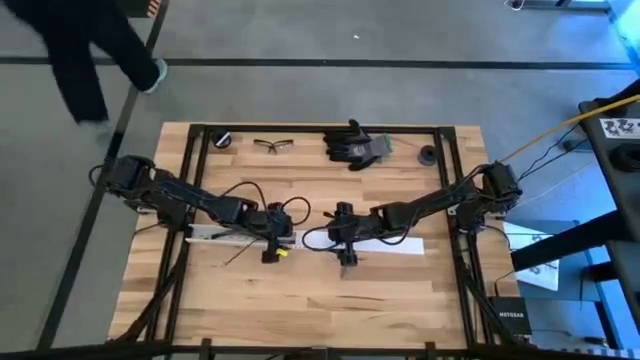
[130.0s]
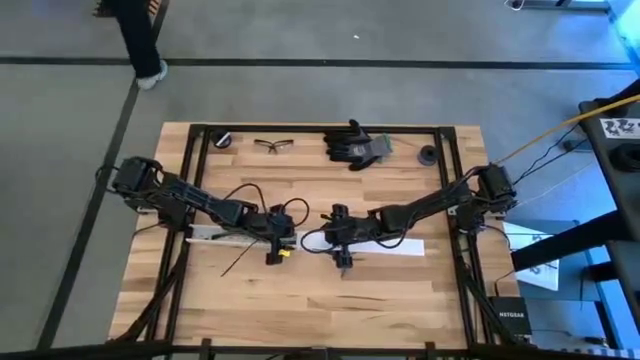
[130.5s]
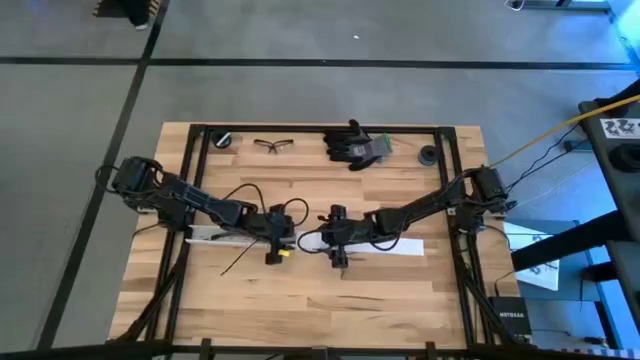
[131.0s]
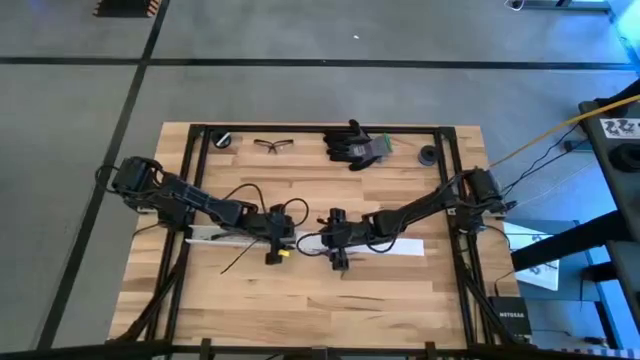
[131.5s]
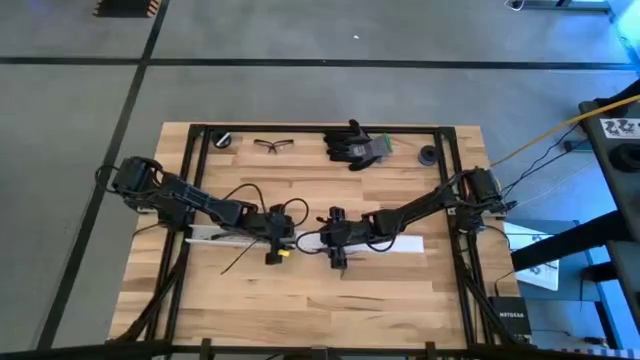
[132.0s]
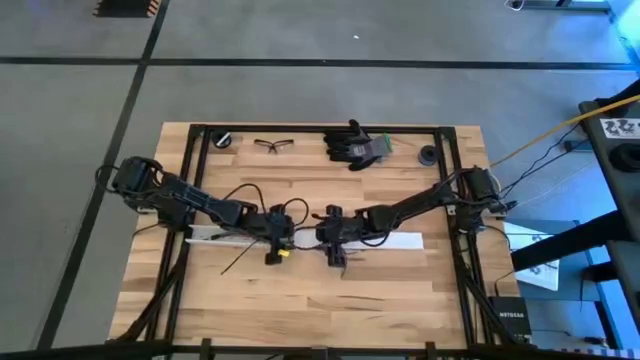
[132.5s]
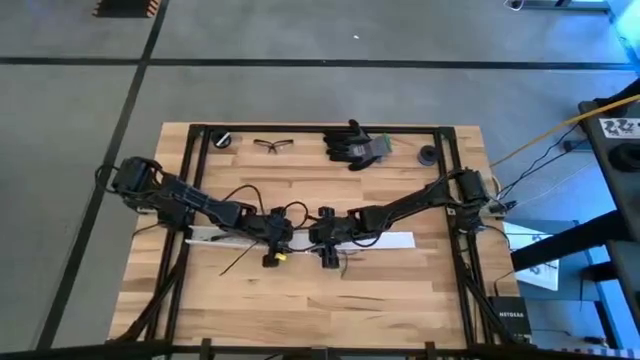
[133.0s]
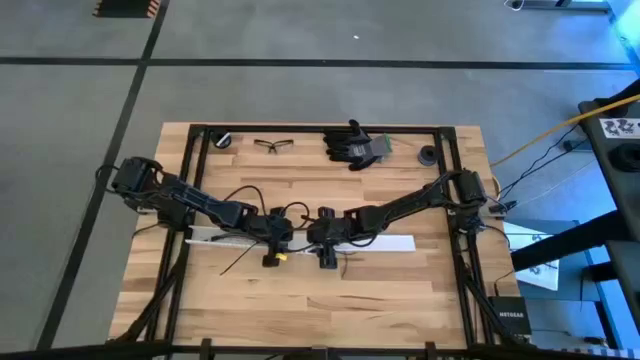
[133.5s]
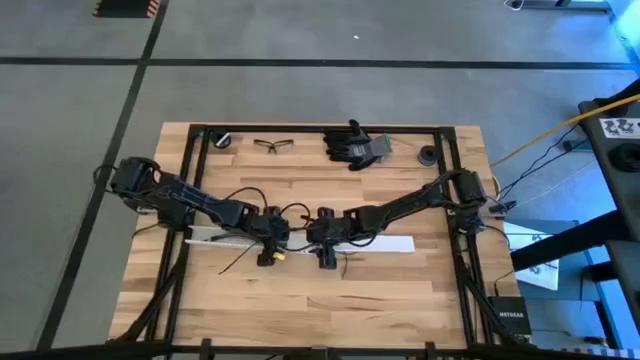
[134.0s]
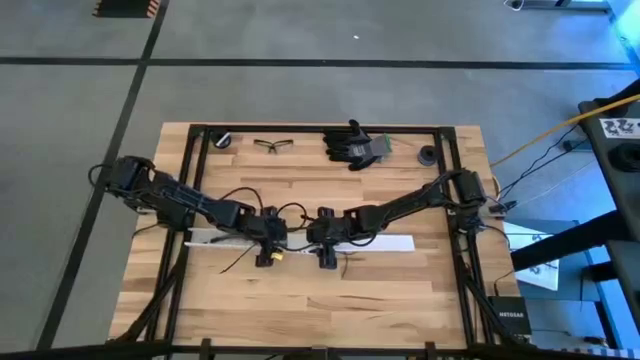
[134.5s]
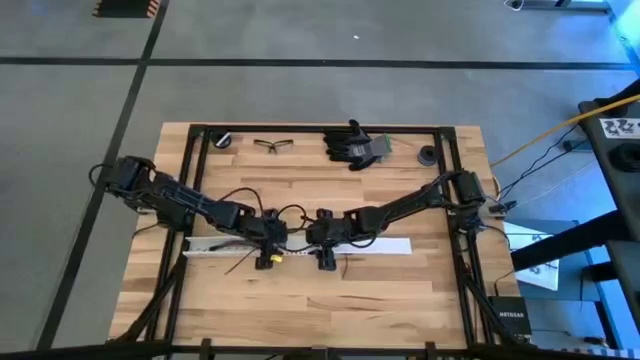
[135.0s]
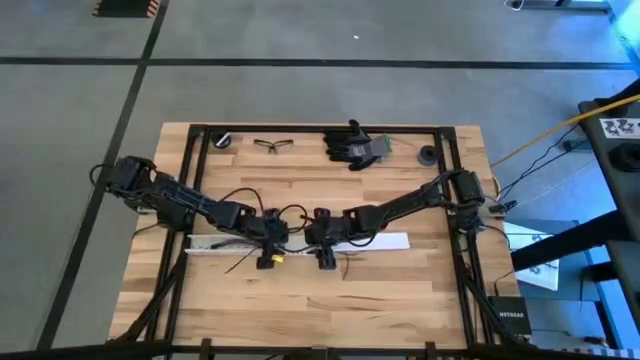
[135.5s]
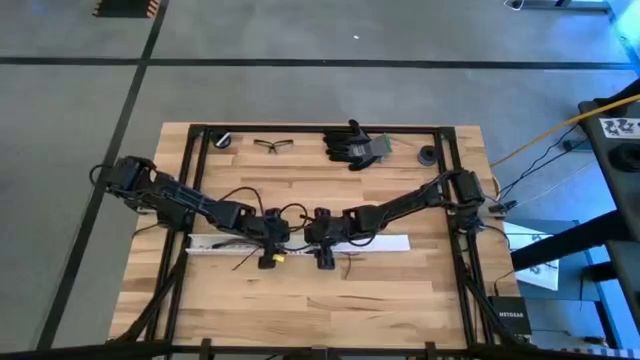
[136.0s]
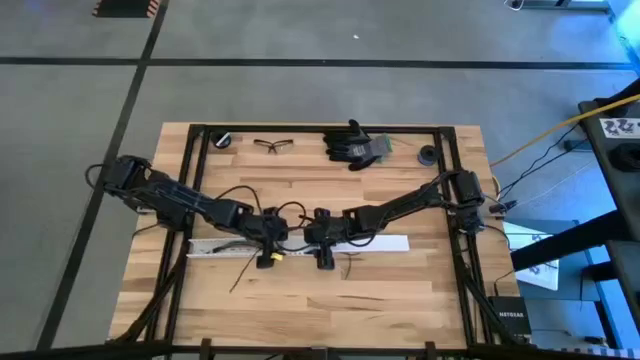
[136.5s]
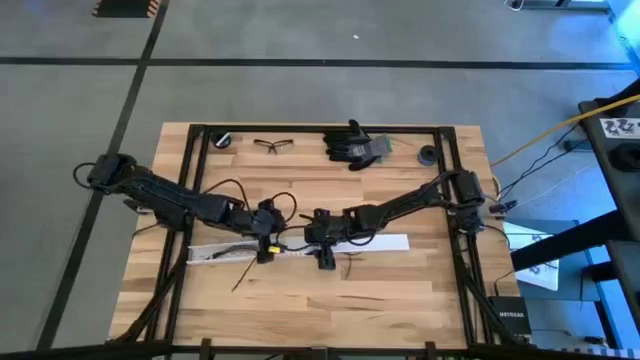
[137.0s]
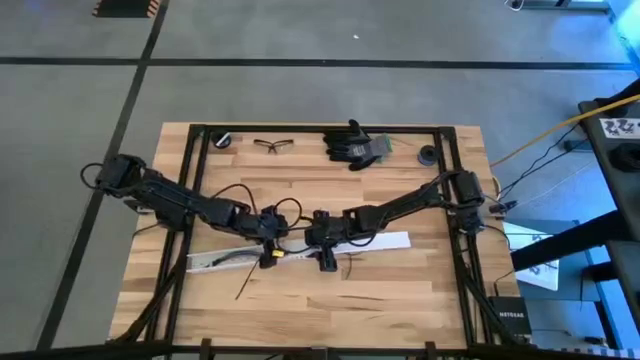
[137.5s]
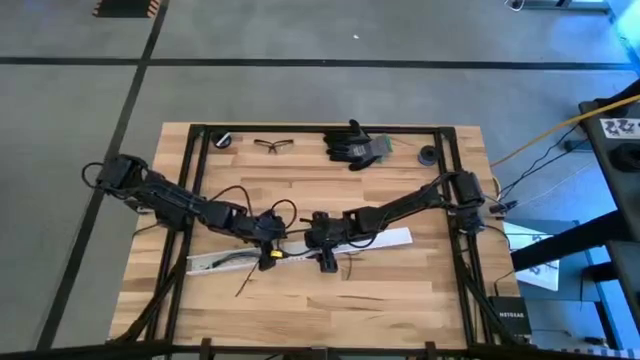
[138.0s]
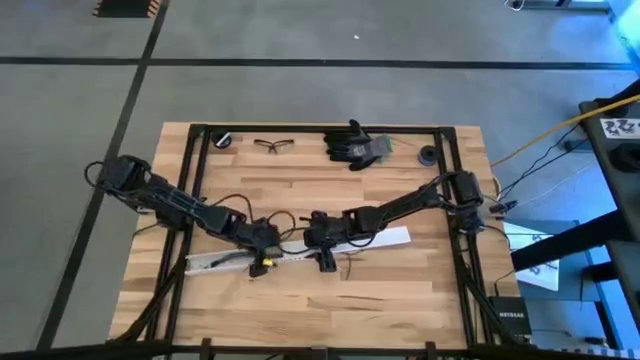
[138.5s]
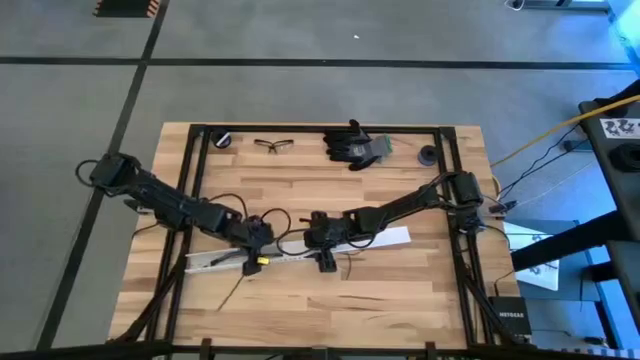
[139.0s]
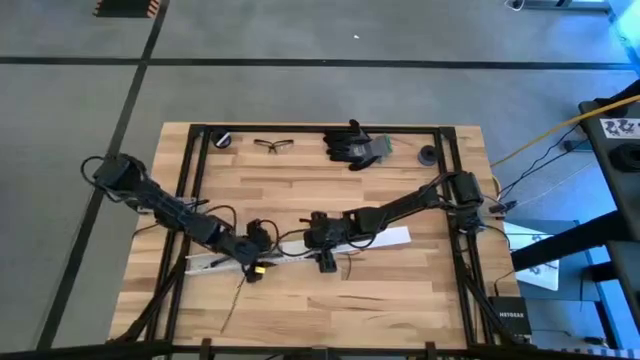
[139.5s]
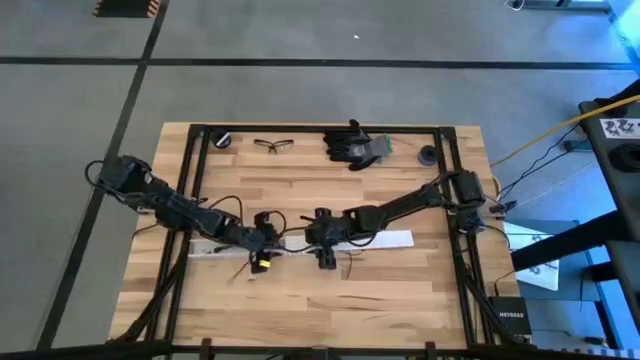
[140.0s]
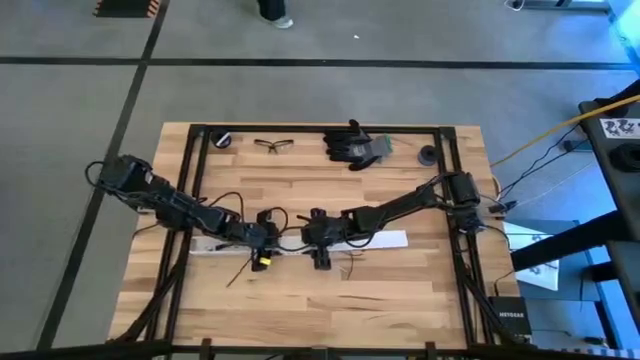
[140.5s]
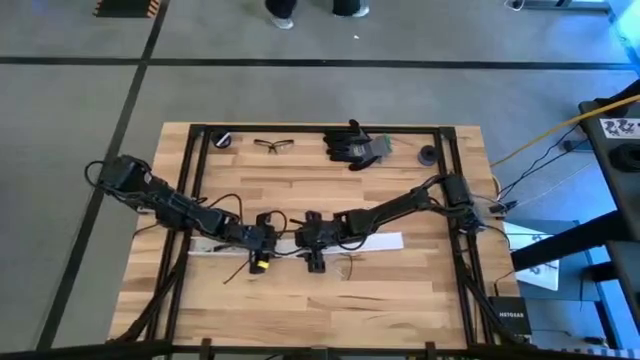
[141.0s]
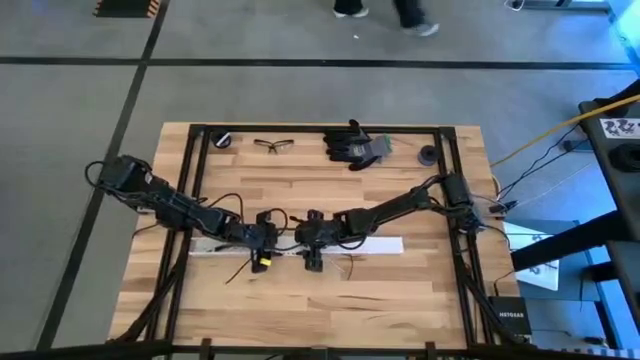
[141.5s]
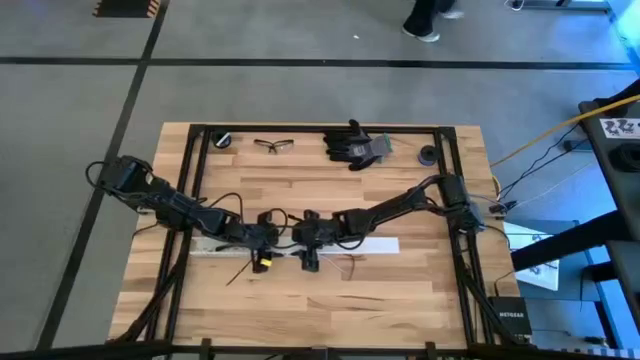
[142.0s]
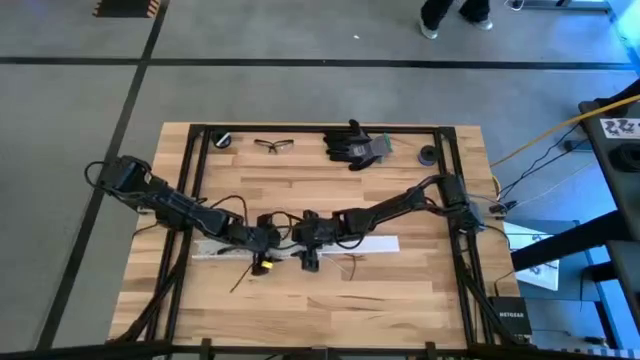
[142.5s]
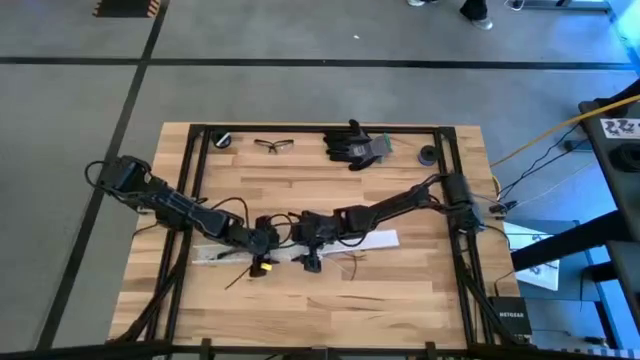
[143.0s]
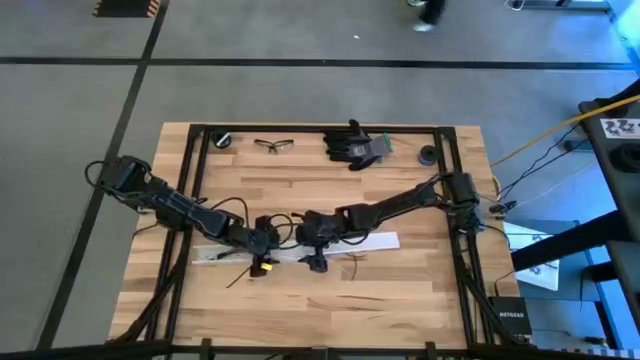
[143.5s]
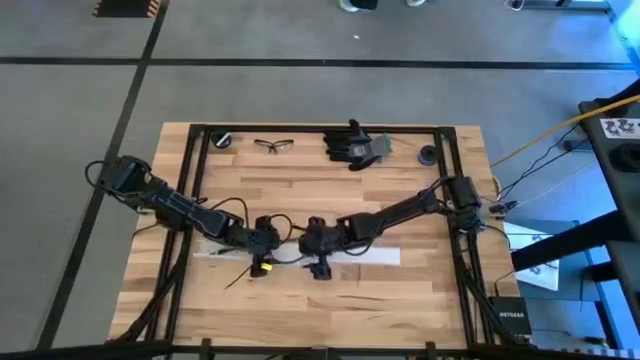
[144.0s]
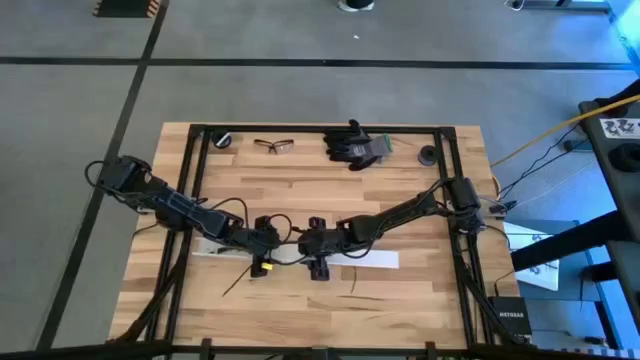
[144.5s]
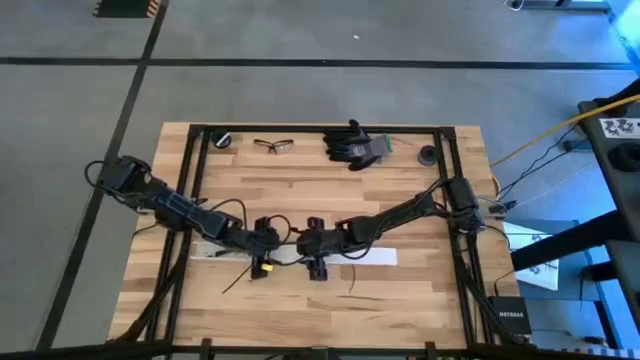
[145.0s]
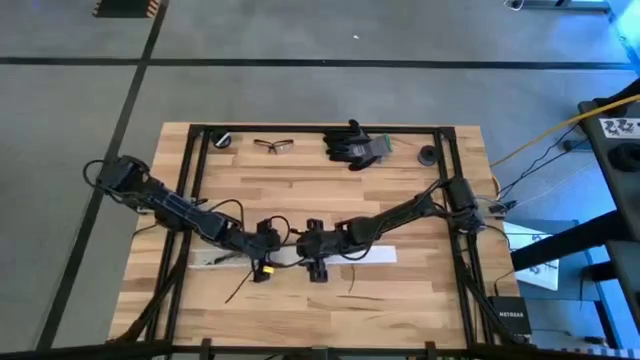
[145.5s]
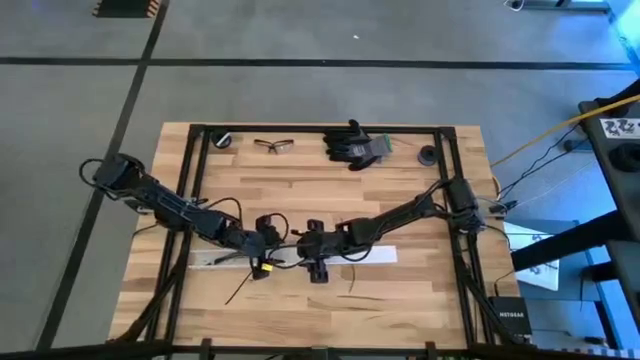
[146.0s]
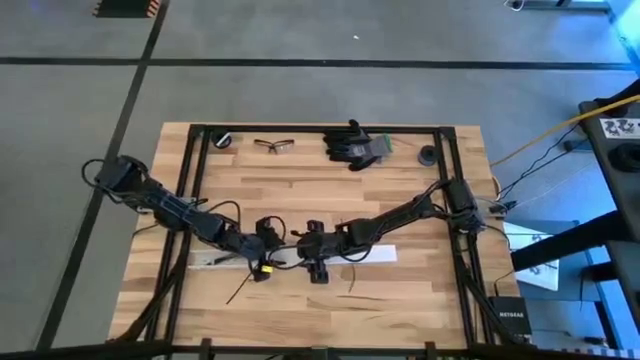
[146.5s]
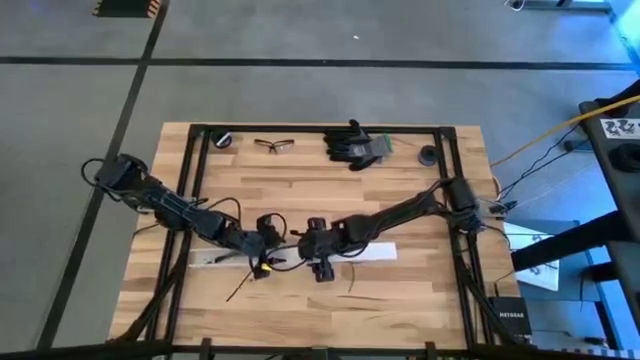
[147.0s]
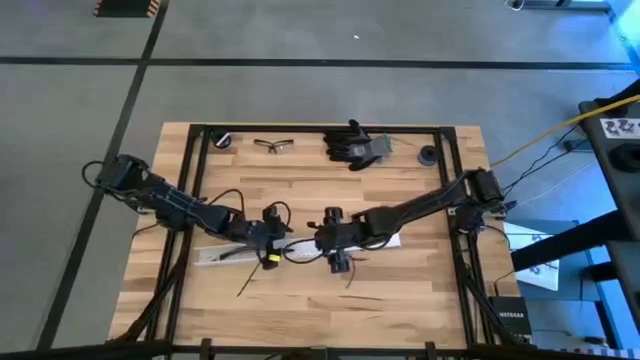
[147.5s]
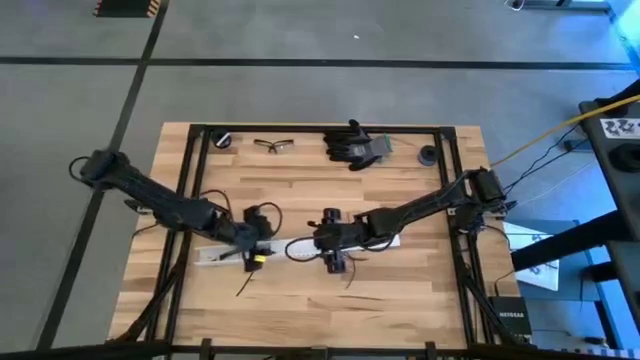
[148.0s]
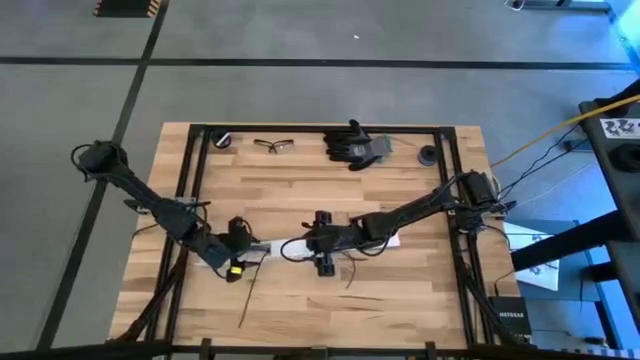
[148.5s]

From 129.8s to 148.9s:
Task: Ziptie cables
Close the white cable duct
